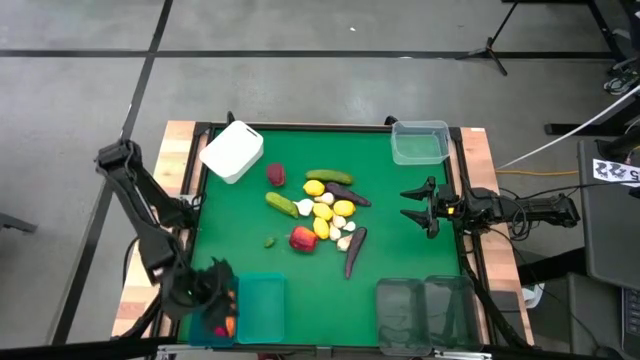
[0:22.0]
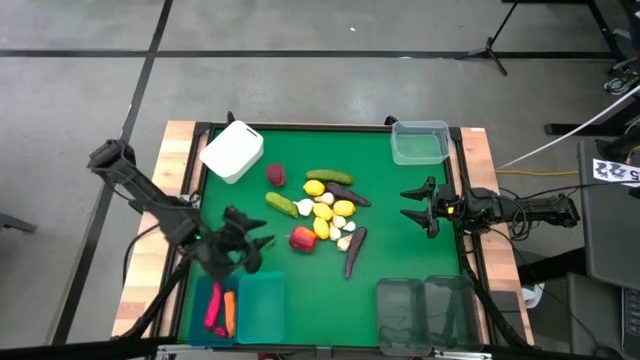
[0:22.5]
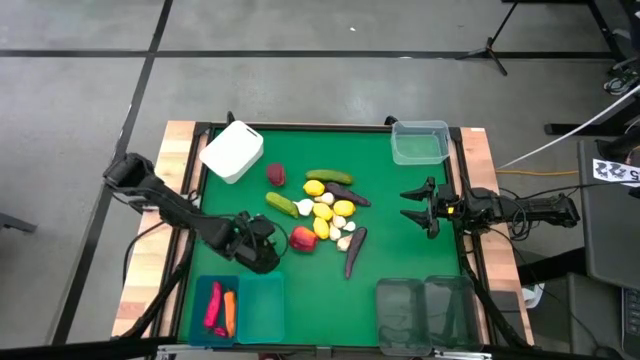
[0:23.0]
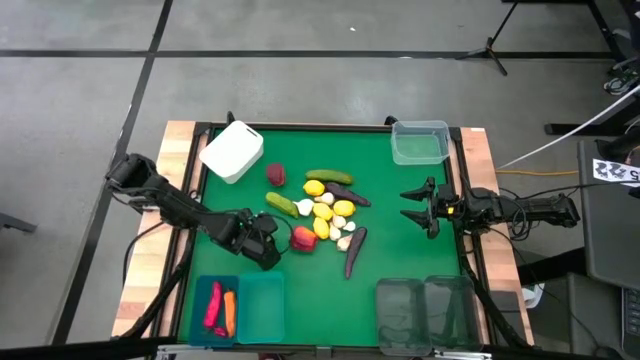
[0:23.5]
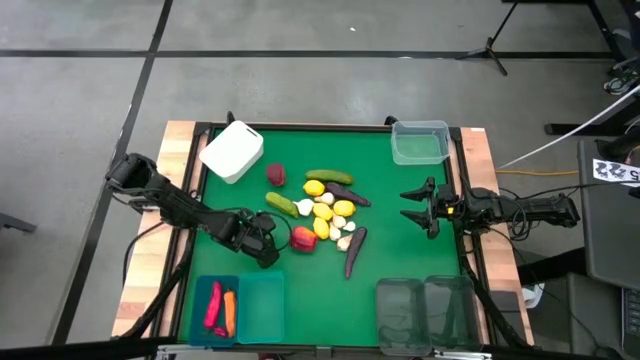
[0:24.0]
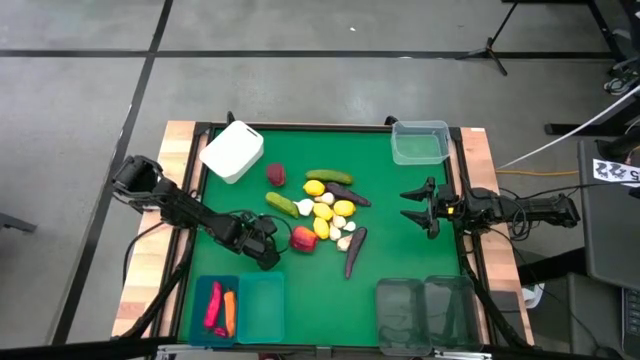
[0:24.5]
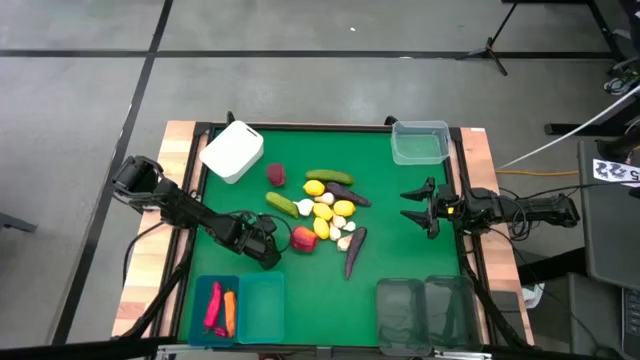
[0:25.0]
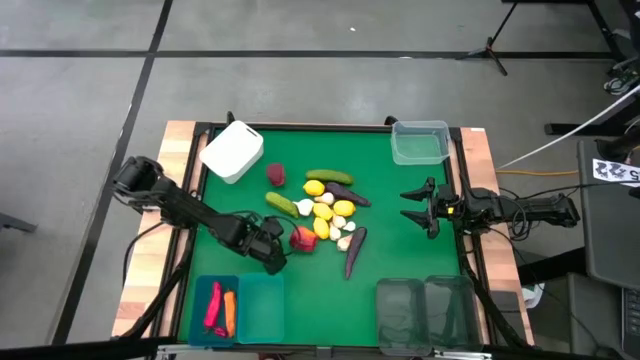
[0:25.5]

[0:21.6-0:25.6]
Task: Sort produce into baskets
Put the small green pepper into the dark blue bin

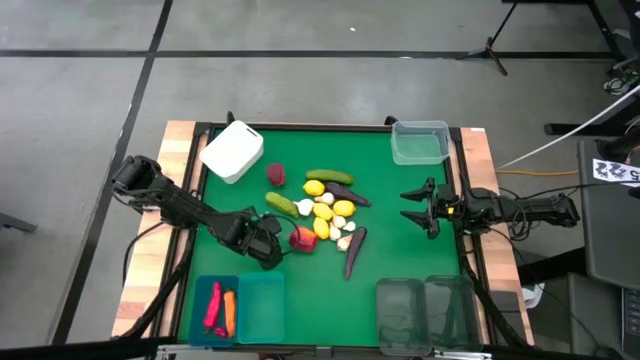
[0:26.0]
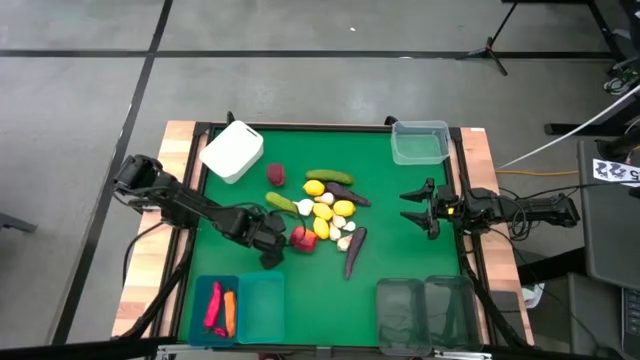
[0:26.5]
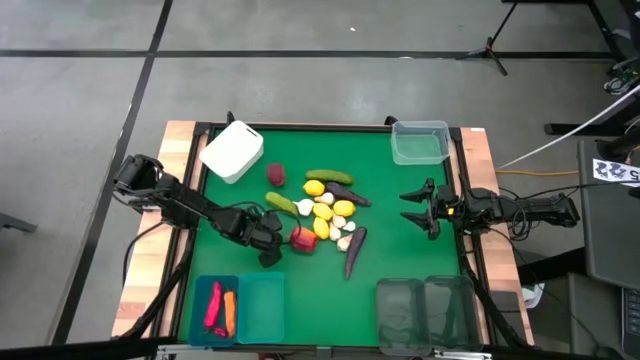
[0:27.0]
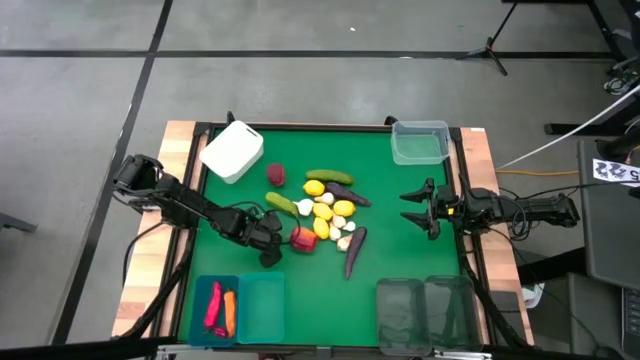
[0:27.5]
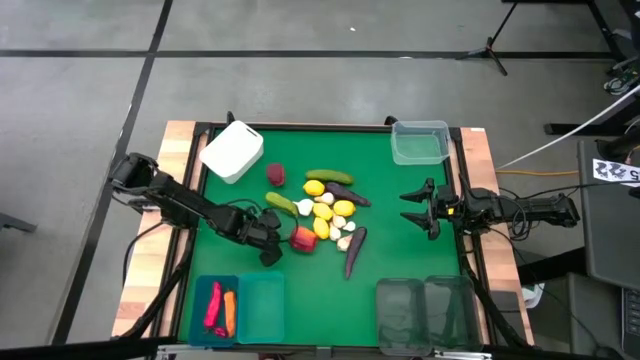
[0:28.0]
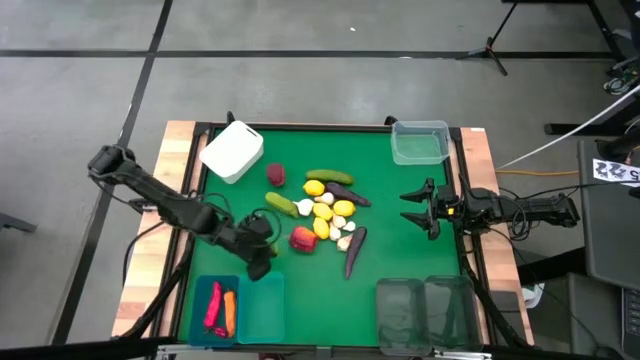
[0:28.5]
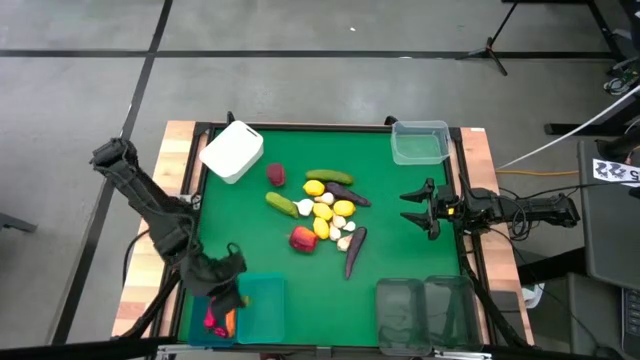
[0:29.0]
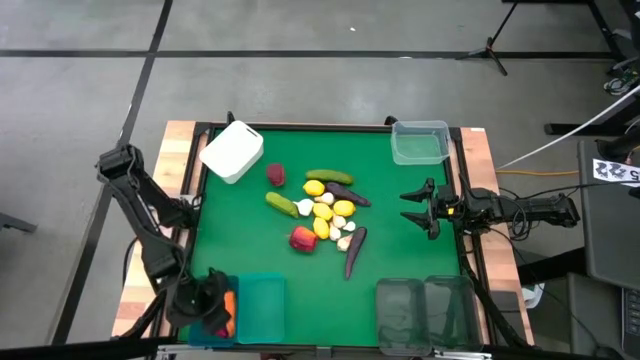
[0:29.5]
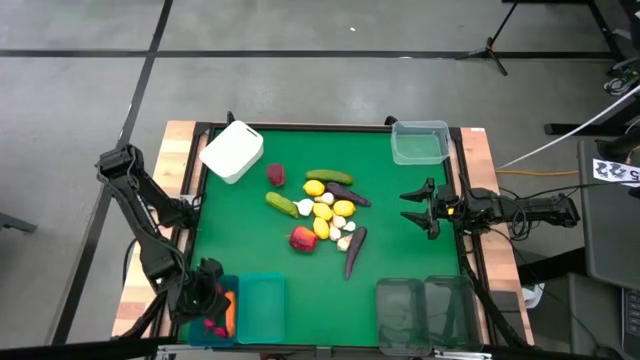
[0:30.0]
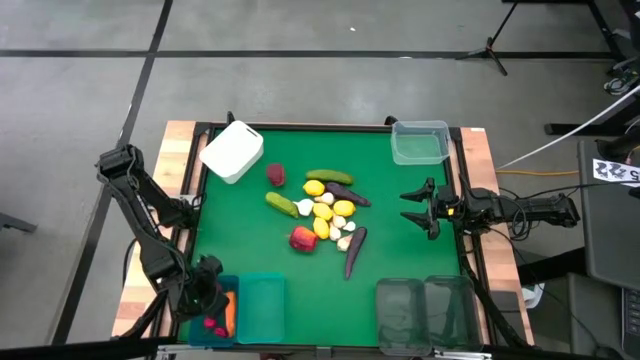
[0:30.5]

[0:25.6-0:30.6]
Put the small green pepper into the dark blue bin

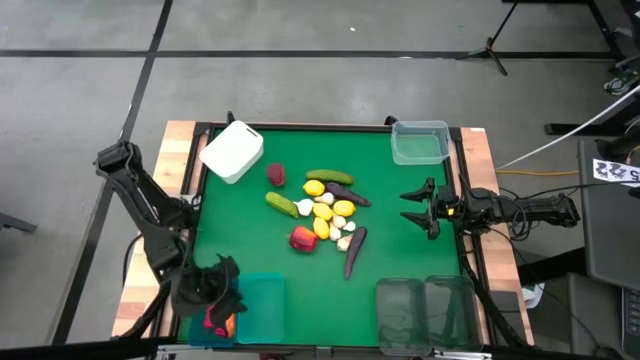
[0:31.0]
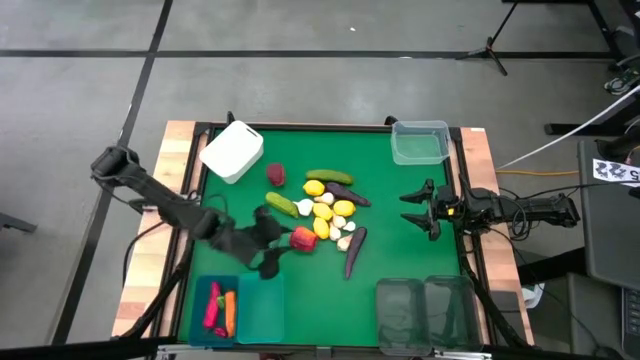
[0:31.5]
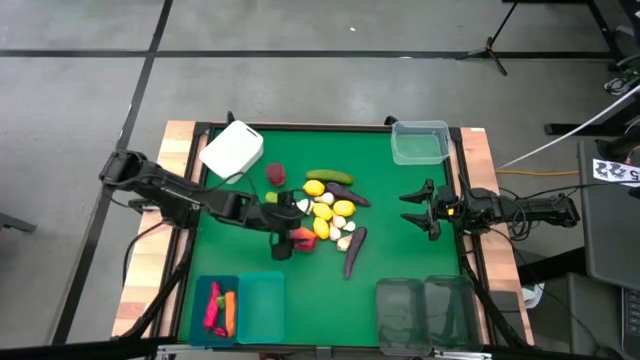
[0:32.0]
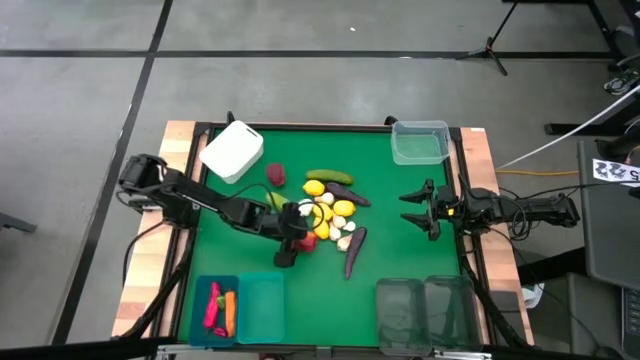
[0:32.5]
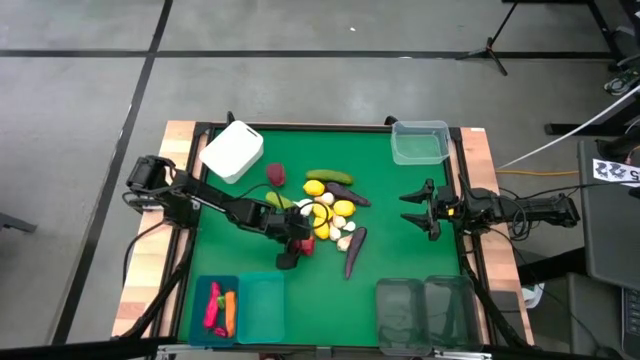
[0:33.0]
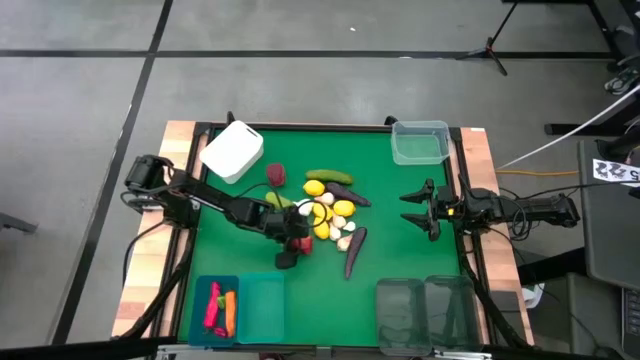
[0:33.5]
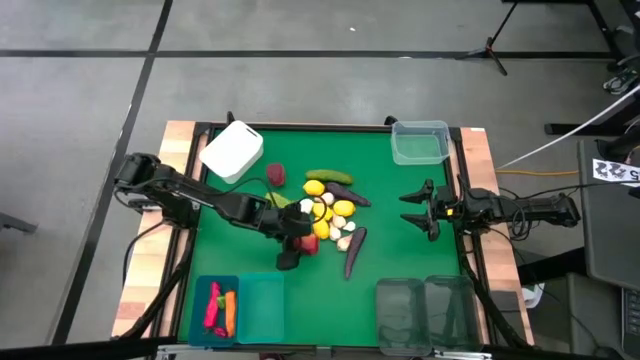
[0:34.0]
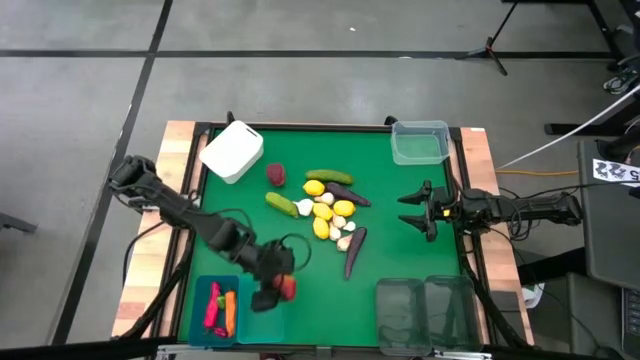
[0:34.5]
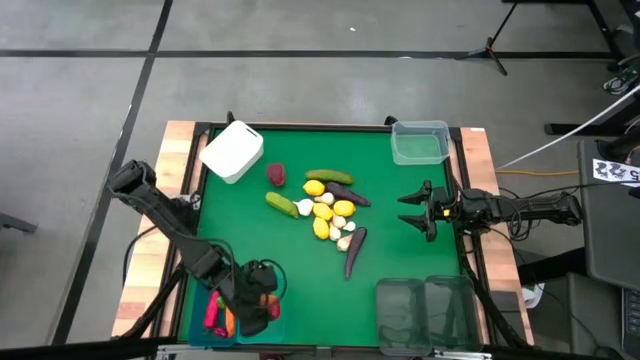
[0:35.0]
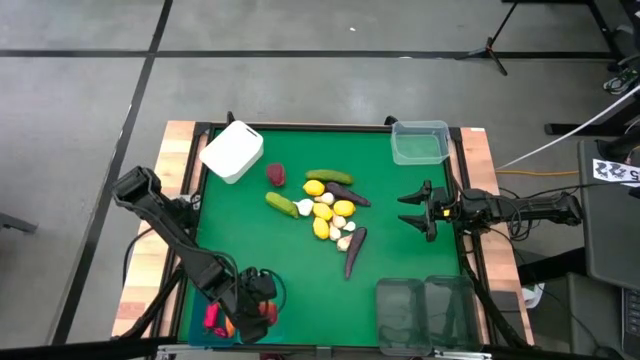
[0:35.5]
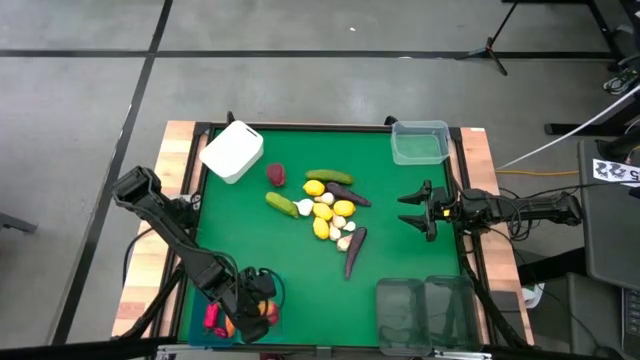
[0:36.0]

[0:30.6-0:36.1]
Put the apple into the transparent blue bin

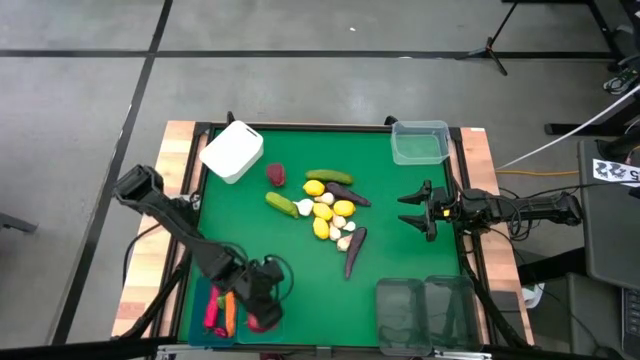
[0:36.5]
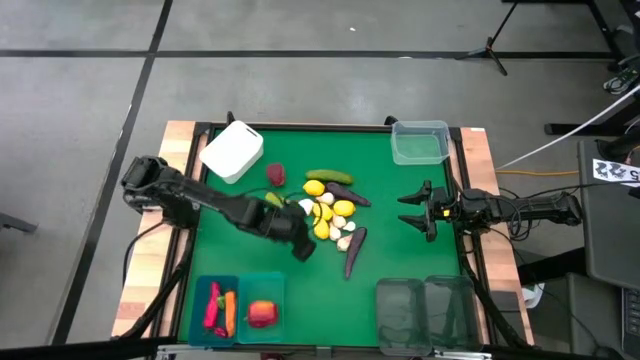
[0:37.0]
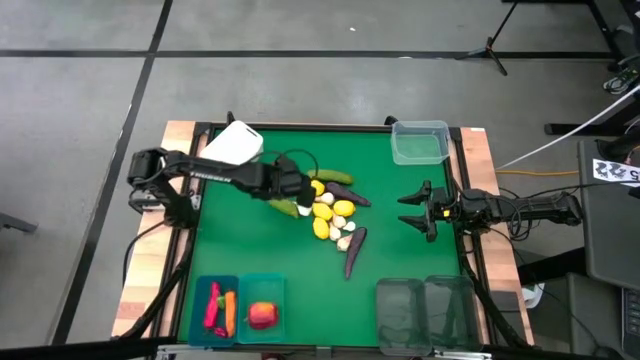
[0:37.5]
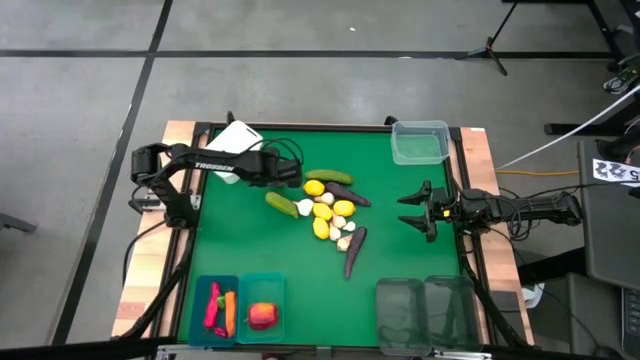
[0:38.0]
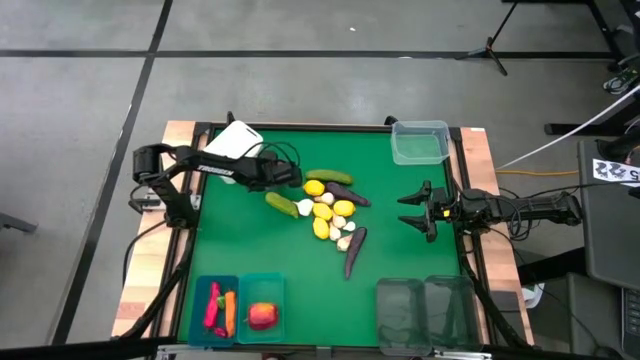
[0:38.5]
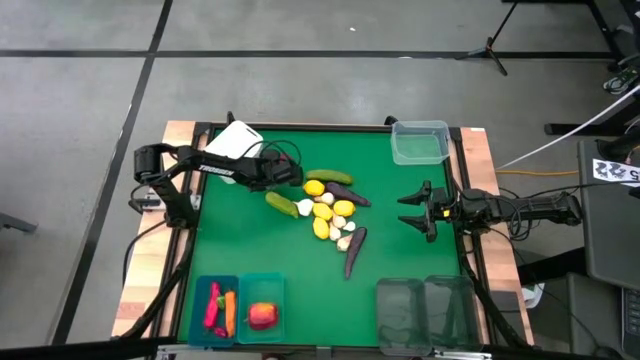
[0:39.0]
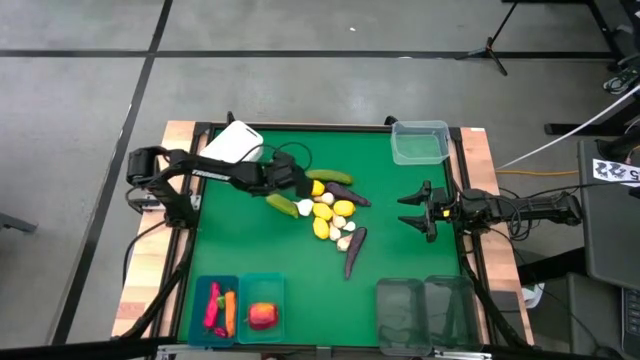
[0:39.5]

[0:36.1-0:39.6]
Put the apple into the transparent blue bin

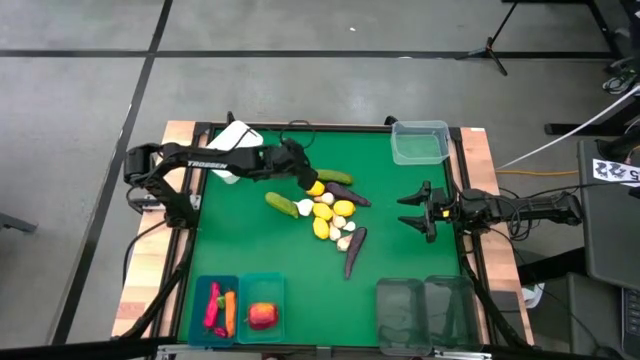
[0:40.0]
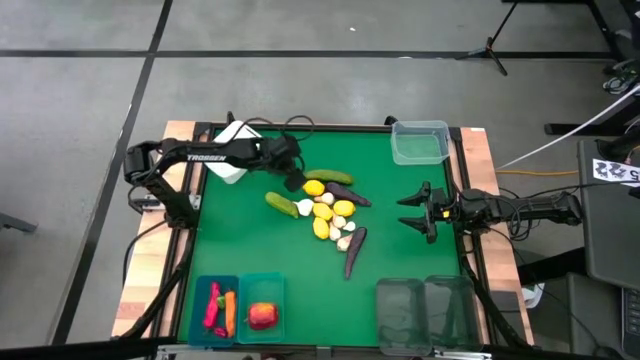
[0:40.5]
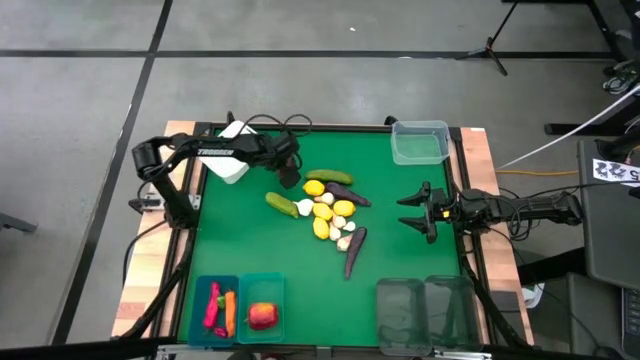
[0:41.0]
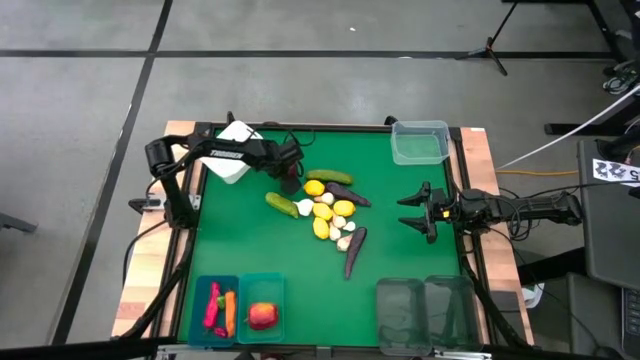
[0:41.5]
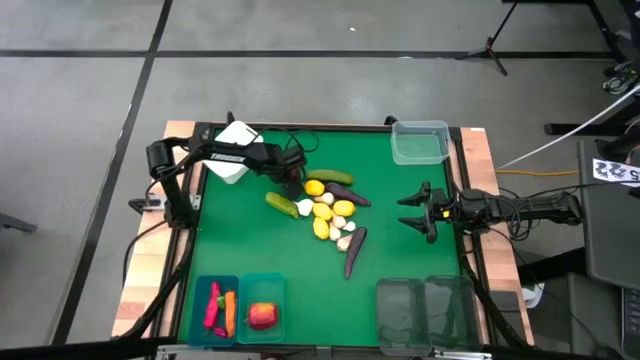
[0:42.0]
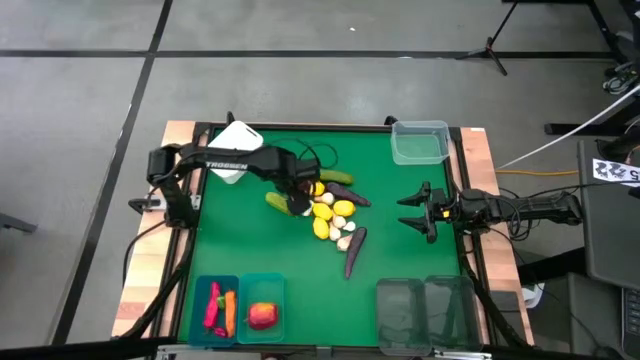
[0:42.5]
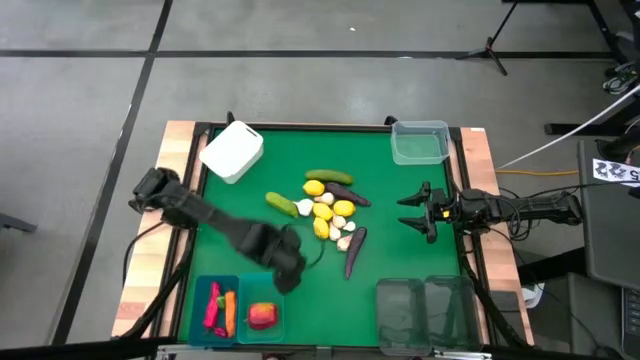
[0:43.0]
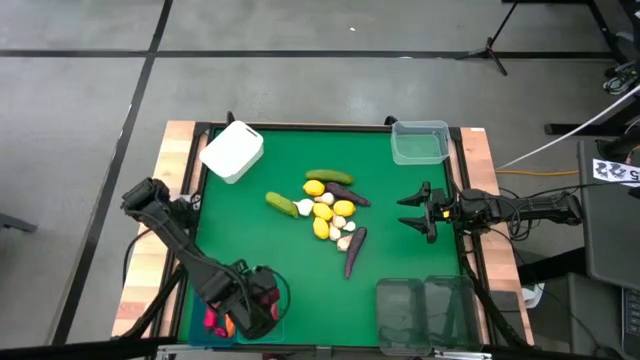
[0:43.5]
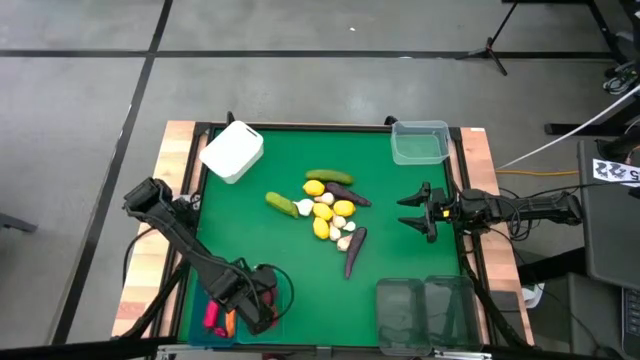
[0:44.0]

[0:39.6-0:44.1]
Put the apple into the transparent blue bin
